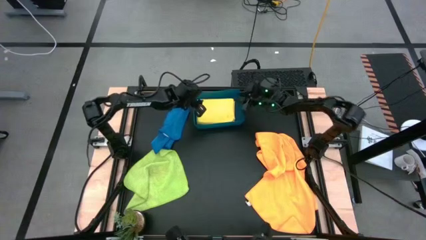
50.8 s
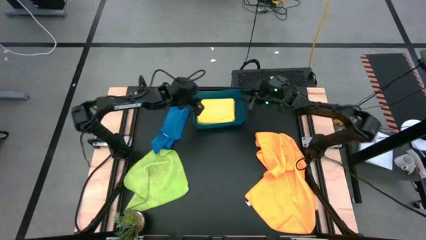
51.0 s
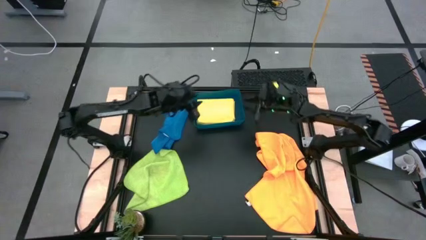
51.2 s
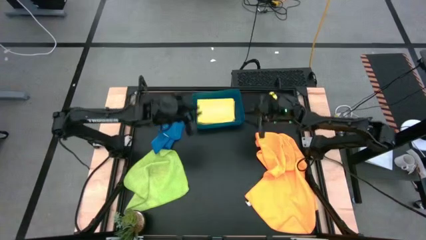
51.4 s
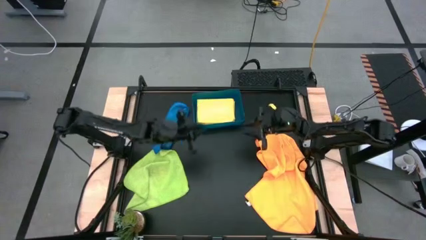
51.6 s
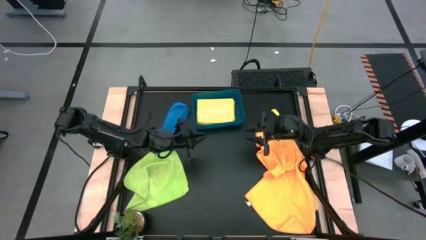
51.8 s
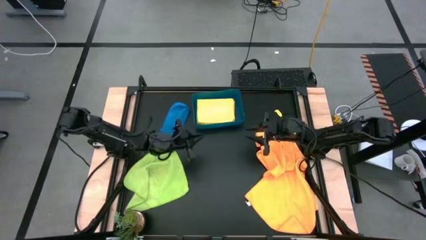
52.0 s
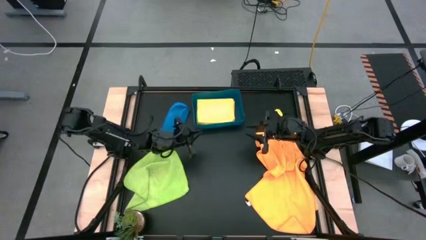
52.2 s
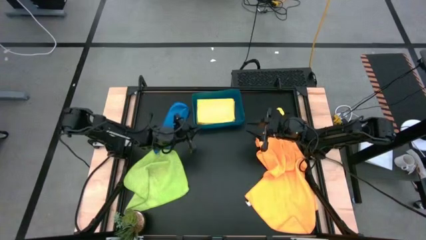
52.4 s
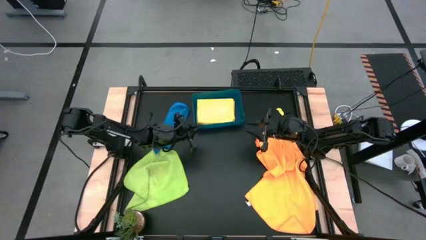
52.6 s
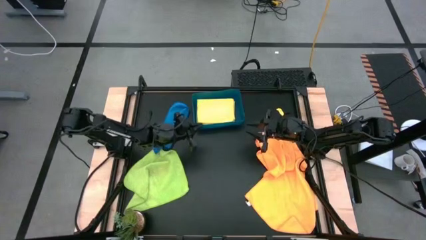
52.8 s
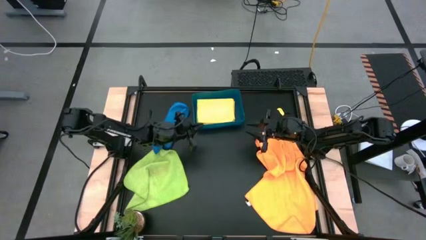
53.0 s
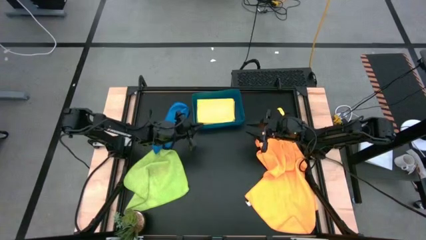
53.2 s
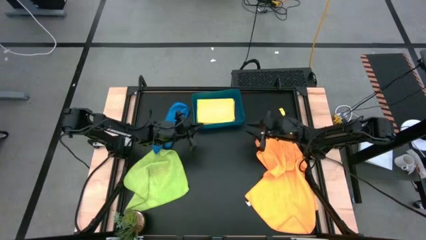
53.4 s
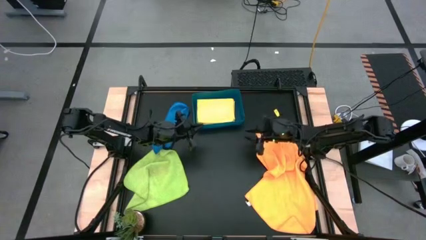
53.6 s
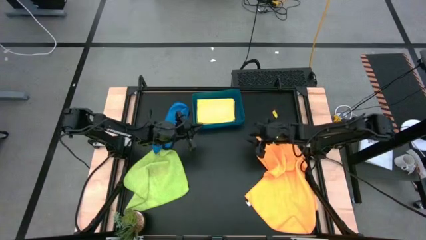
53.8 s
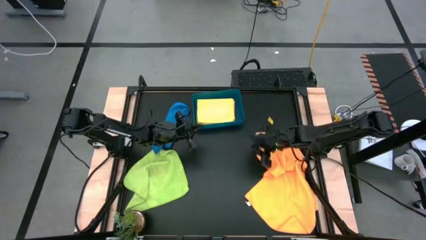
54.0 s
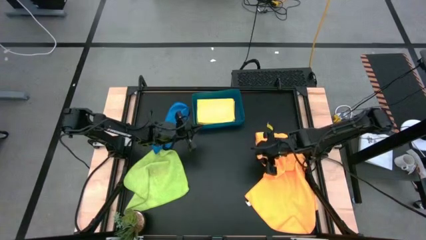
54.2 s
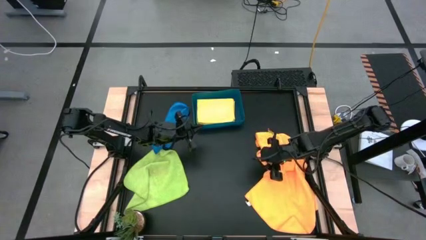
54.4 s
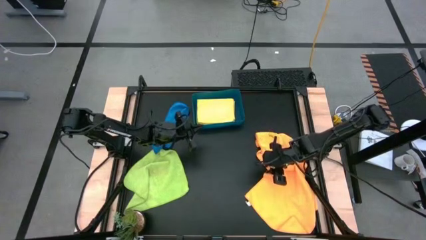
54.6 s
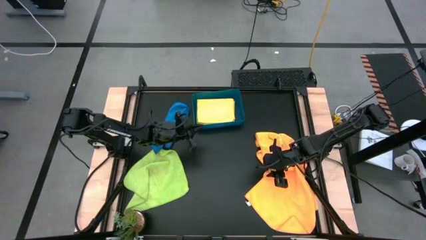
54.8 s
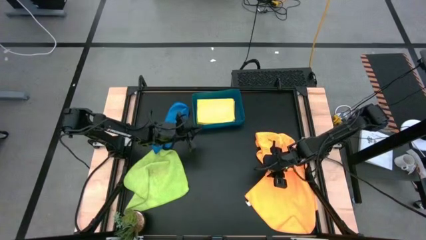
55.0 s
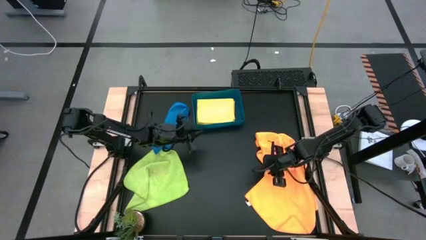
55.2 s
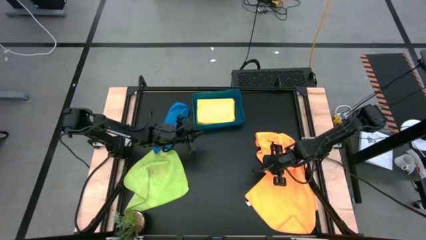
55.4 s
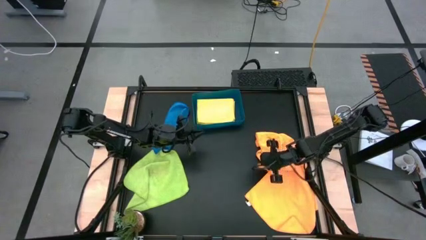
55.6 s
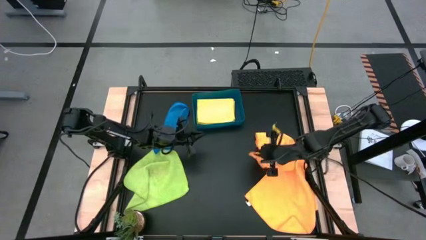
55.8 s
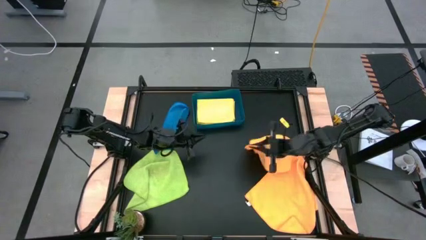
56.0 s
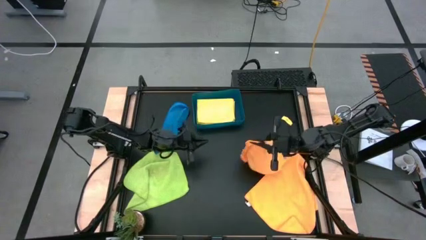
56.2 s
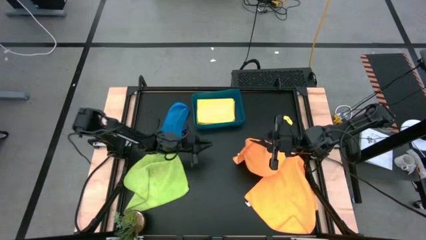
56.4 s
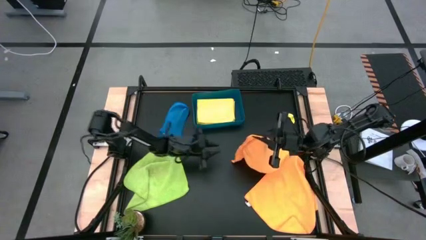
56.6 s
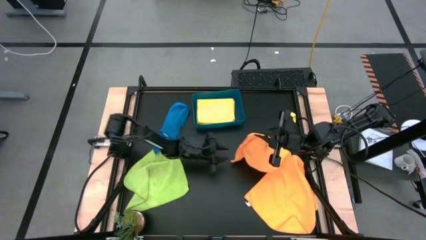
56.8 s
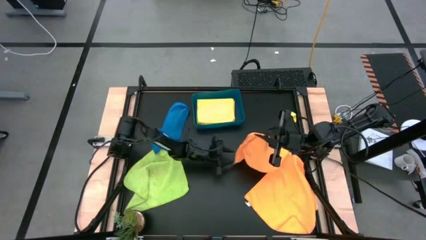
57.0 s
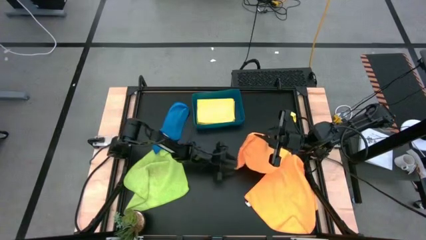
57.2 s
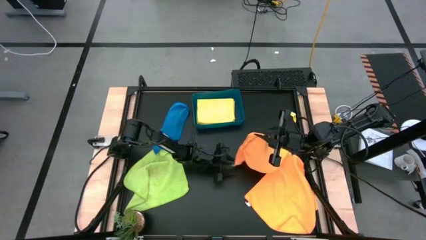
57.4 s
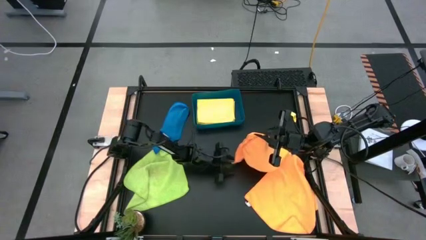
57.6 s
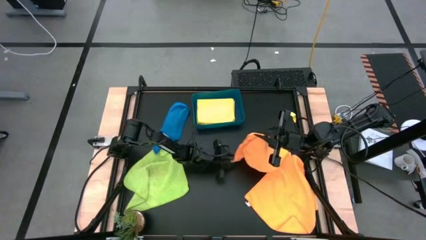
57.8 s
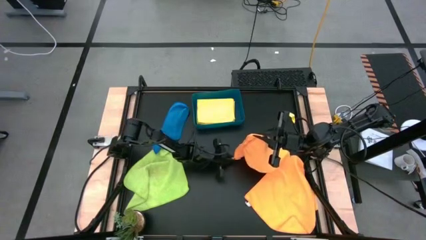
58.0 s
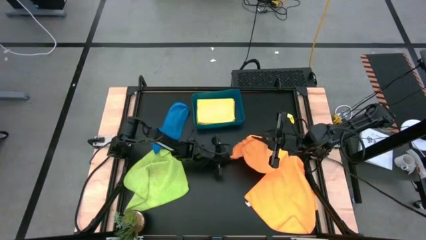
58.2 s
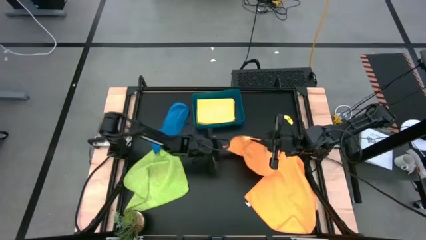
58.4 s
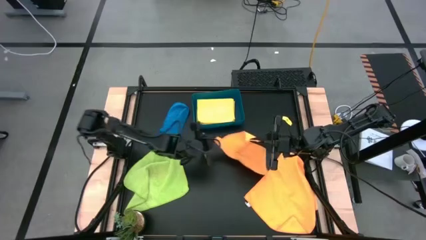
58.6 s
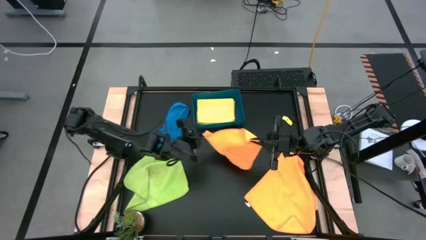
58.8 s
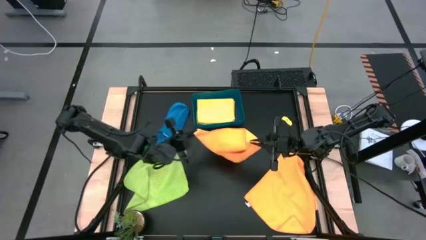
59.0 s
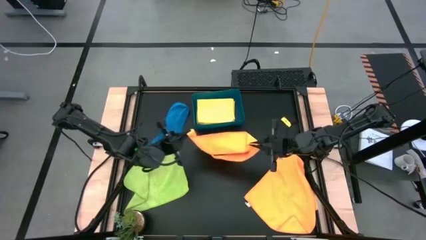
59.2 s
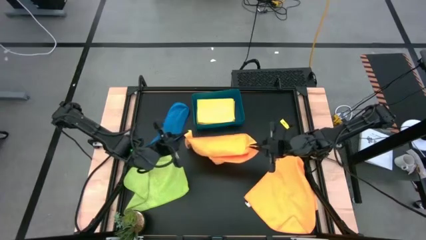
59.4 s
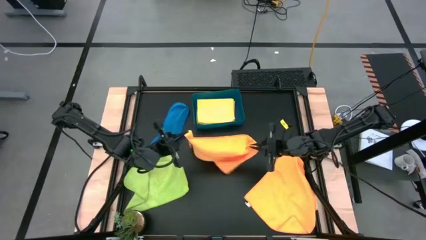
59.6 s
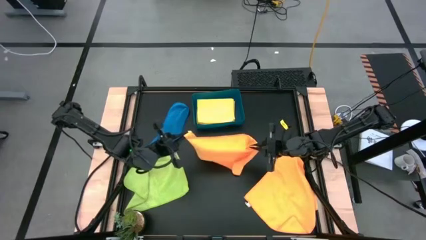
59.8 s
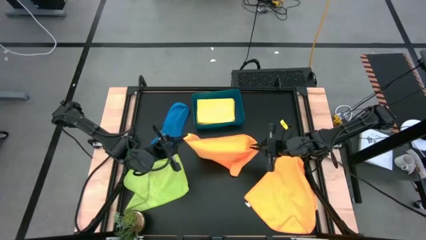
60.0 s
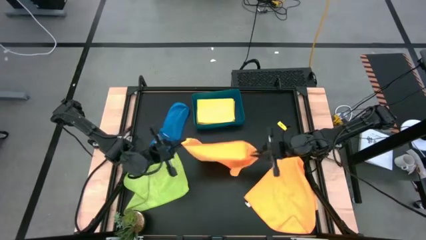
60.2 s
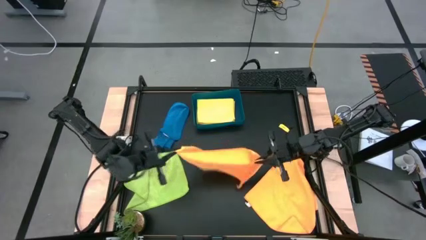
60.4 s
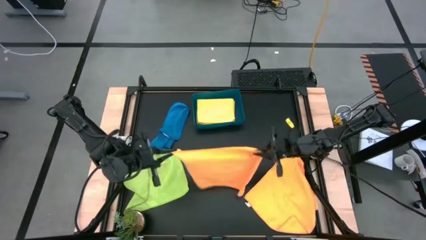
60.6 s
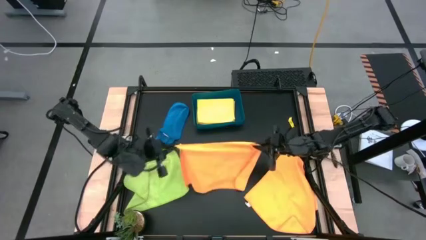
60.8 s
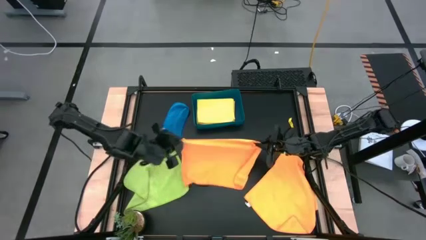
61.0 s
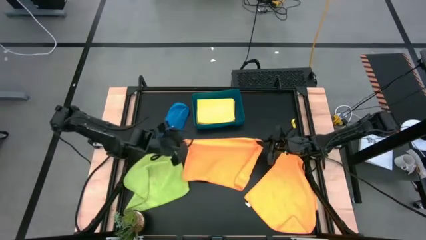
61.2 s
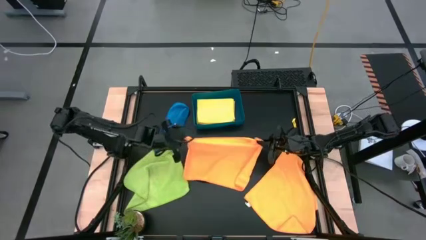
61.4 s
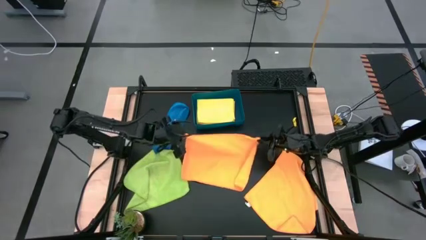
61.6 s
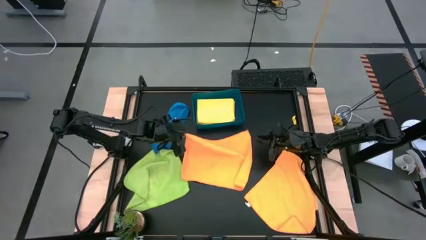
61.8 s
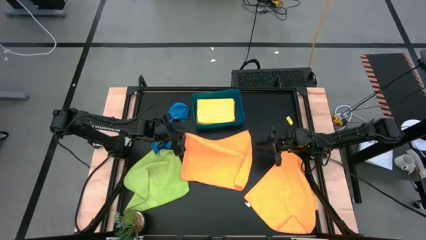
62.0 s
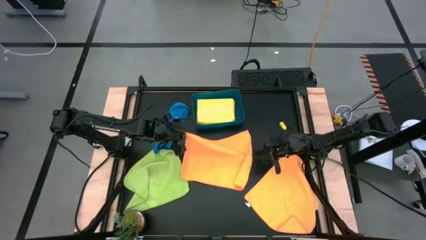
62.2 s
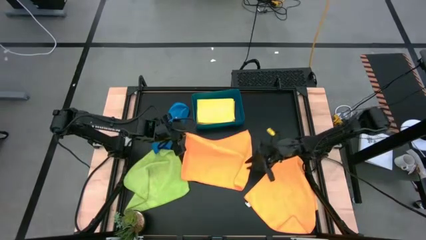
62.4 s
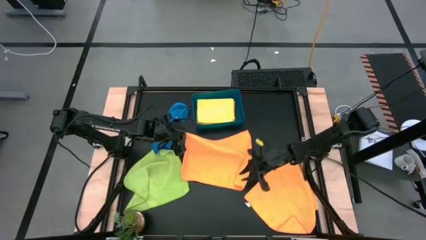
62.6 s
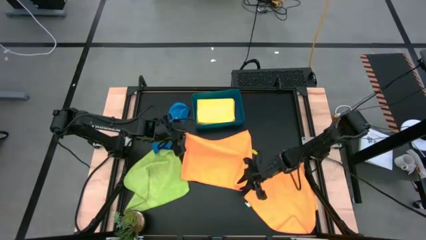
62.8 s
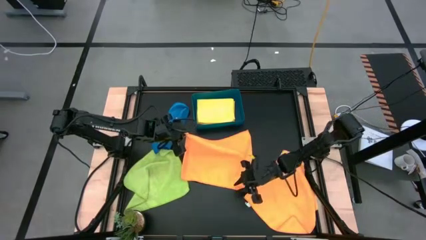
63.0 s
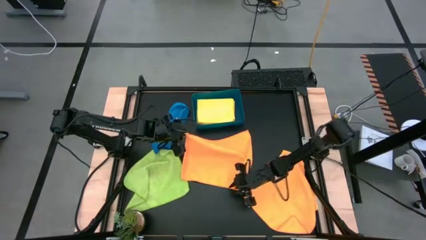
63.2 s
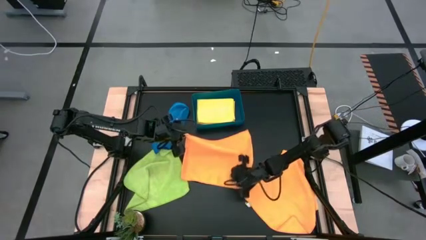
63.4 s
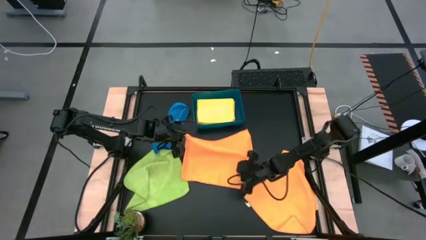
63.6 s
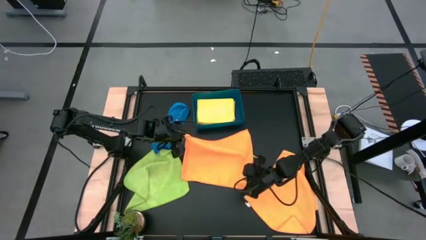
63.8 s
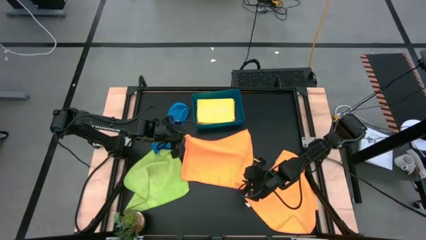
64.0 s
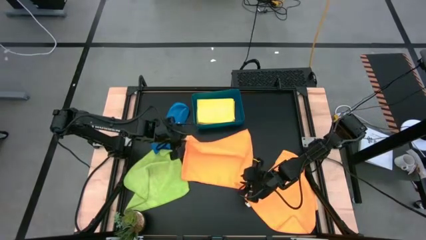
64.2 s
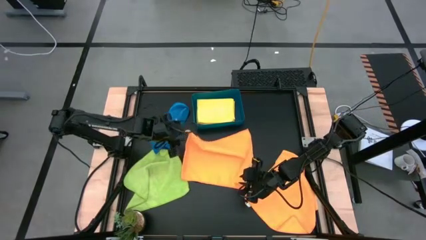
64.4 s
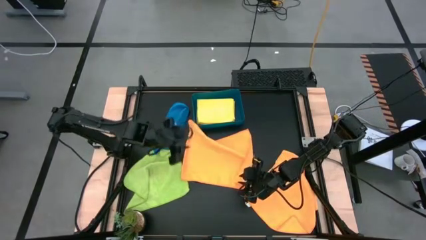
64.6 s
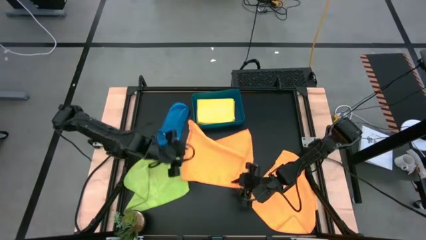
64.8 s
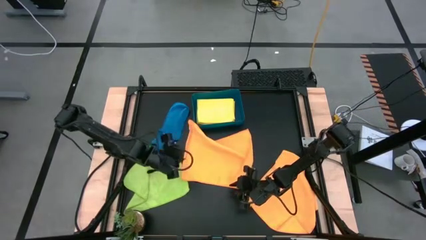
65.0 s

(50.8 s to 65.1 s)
Task: Fold microfiber towels
Fold the top orange microfiber cloth
